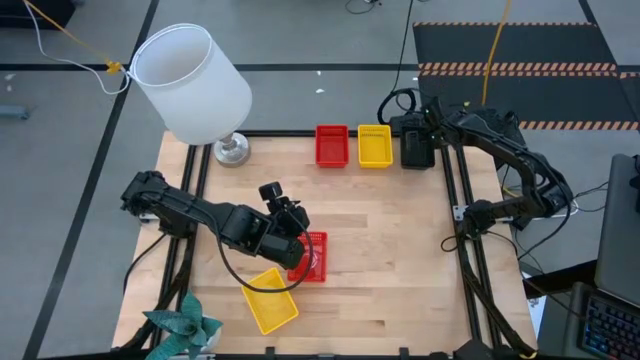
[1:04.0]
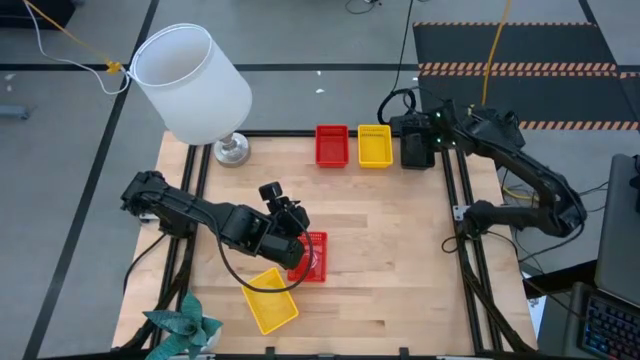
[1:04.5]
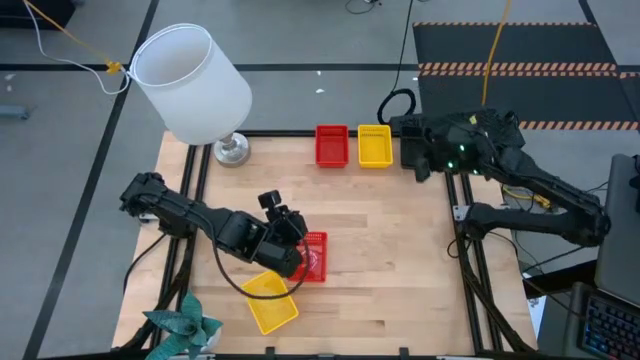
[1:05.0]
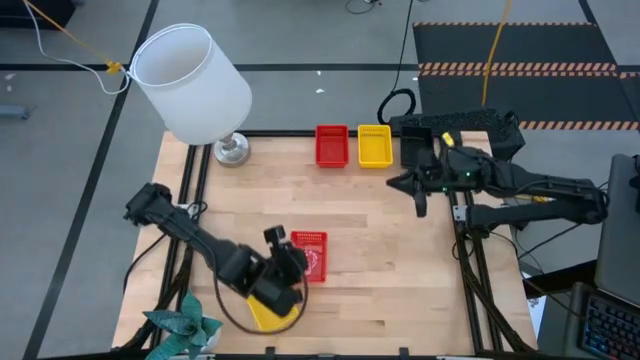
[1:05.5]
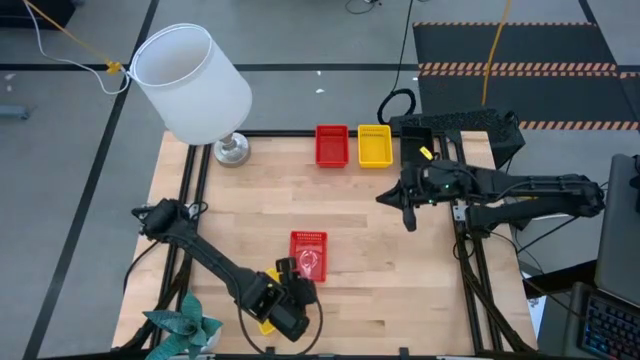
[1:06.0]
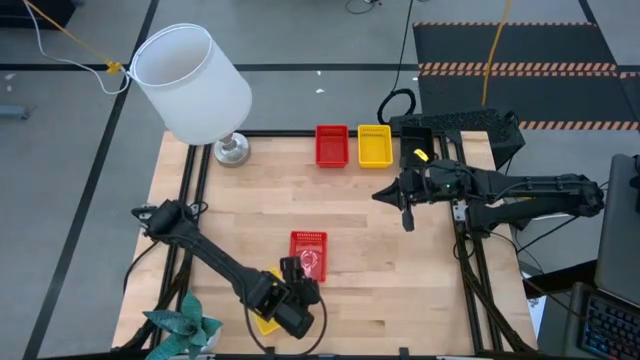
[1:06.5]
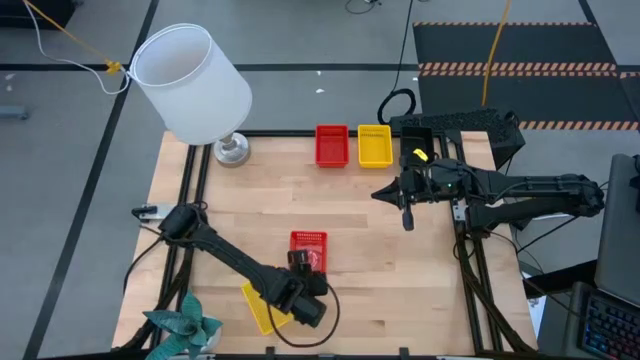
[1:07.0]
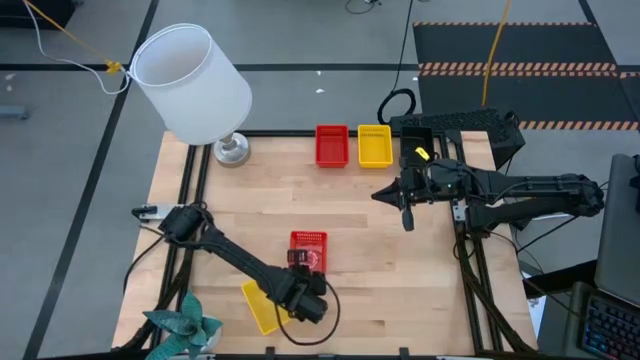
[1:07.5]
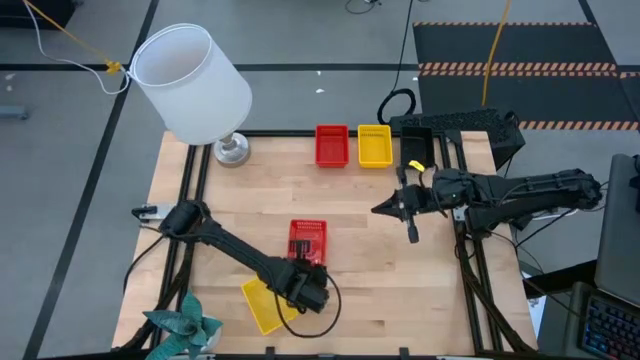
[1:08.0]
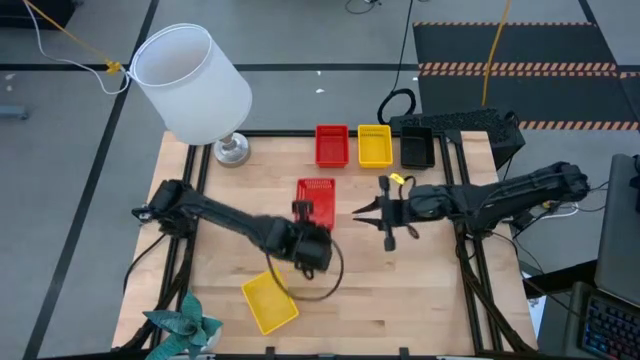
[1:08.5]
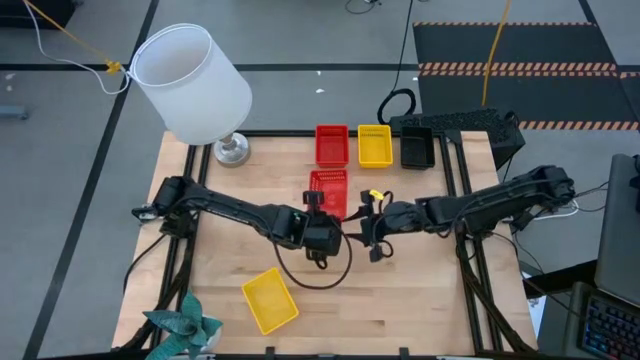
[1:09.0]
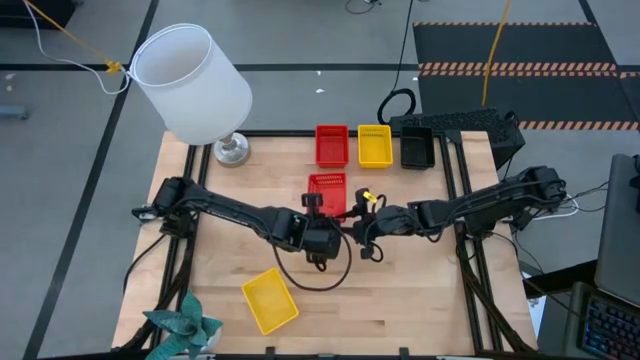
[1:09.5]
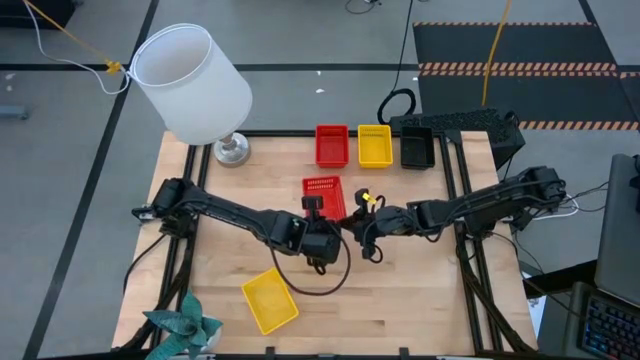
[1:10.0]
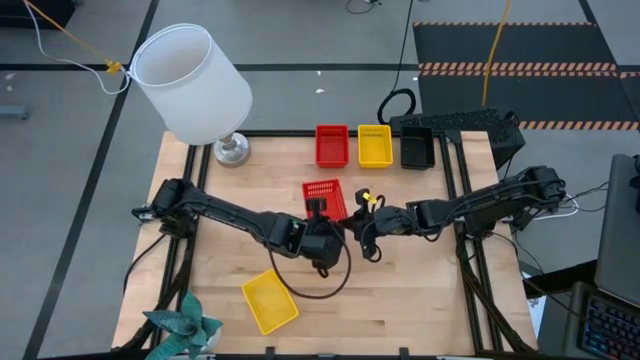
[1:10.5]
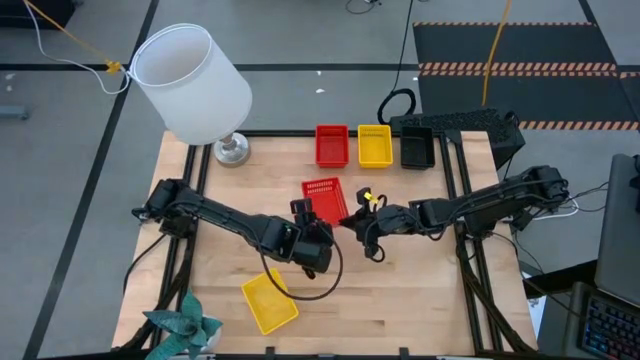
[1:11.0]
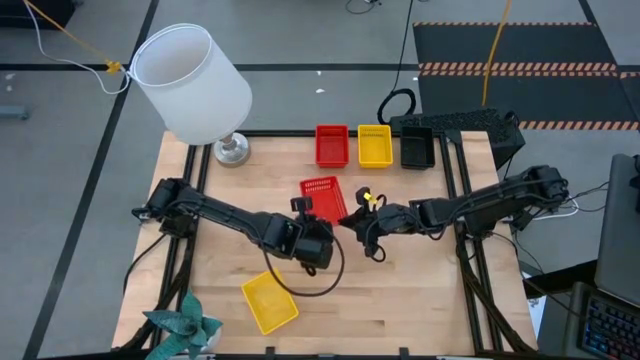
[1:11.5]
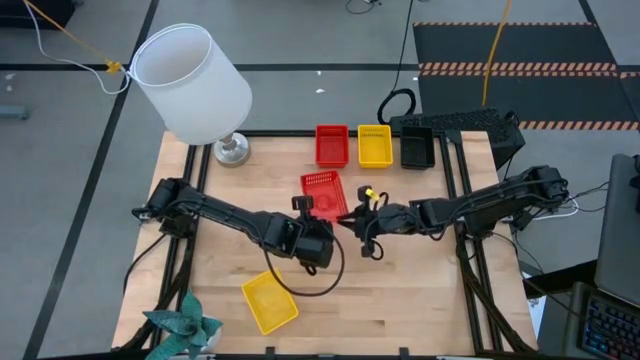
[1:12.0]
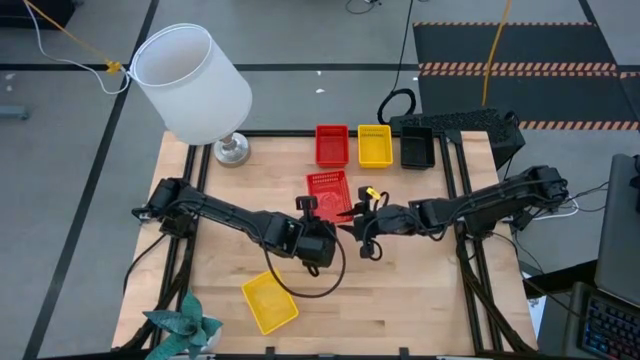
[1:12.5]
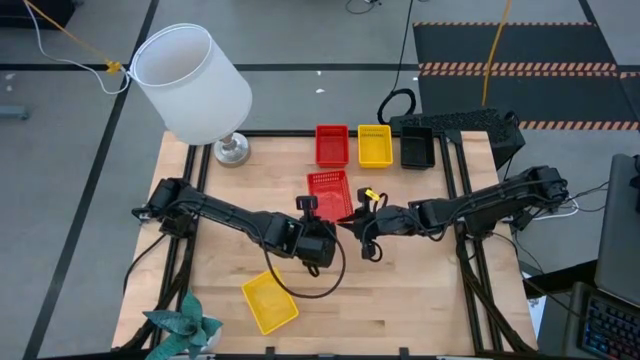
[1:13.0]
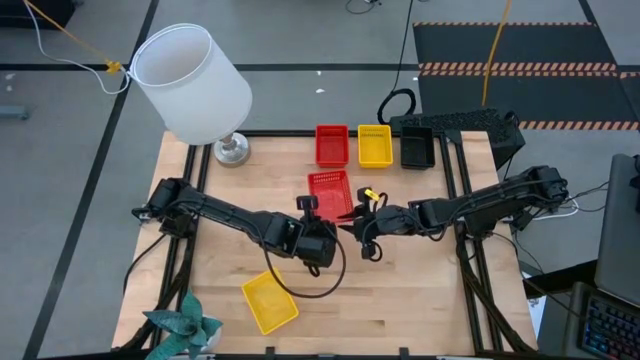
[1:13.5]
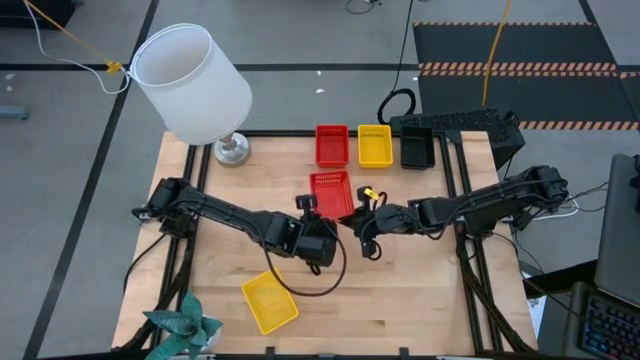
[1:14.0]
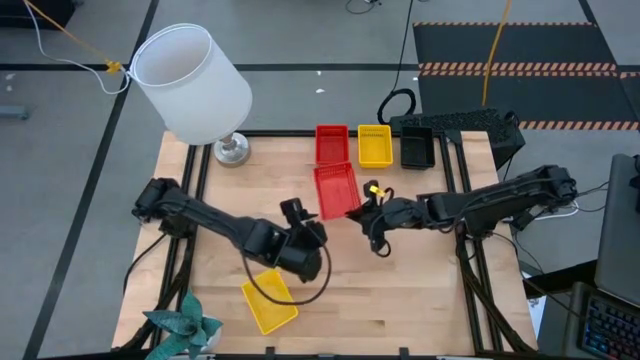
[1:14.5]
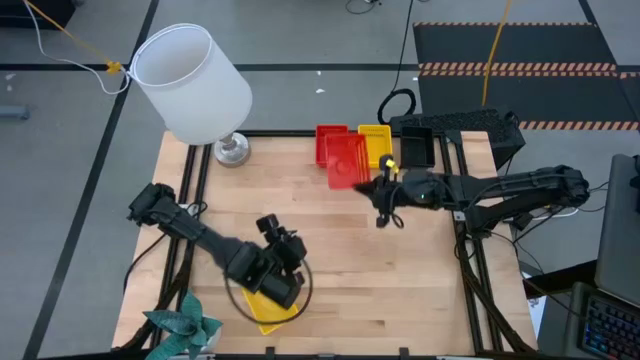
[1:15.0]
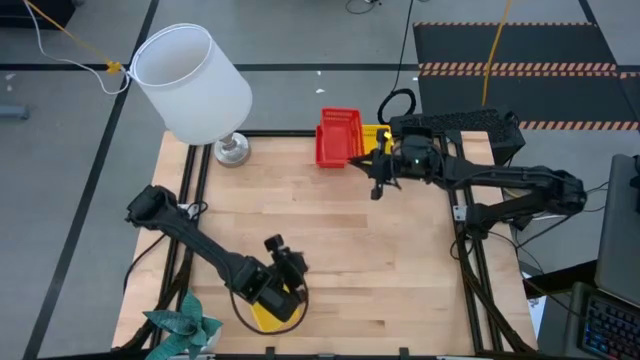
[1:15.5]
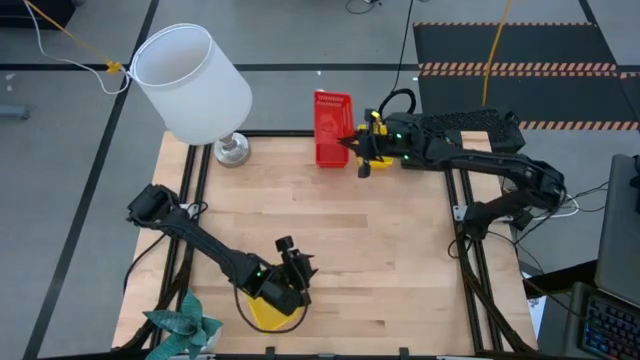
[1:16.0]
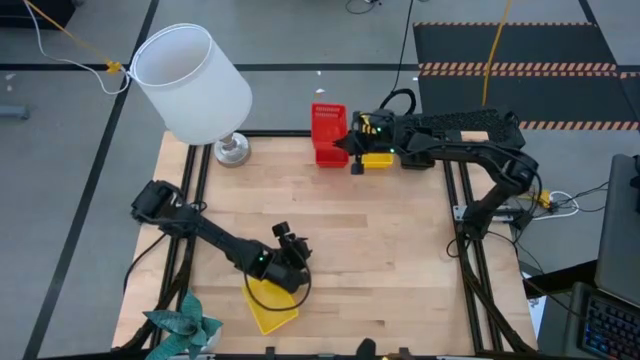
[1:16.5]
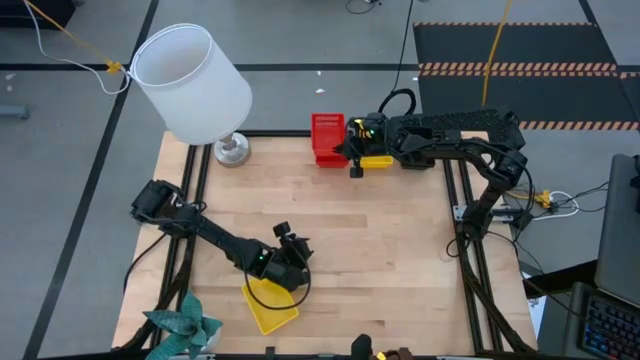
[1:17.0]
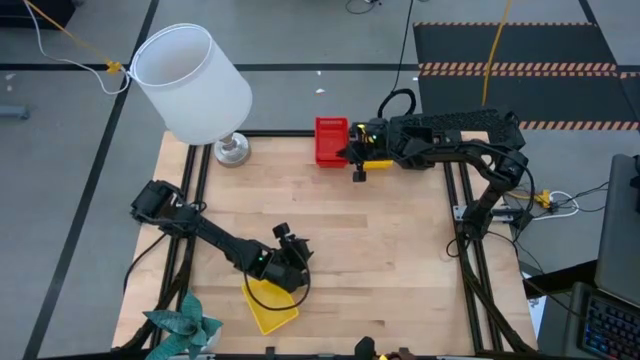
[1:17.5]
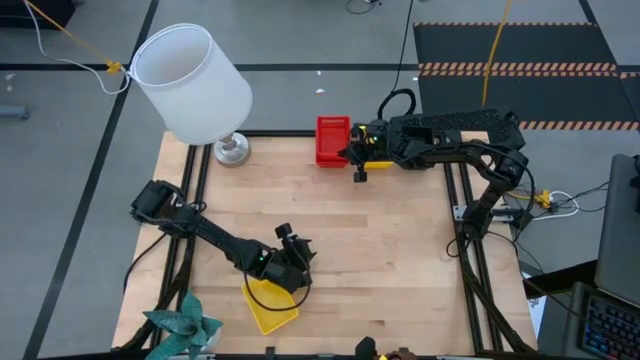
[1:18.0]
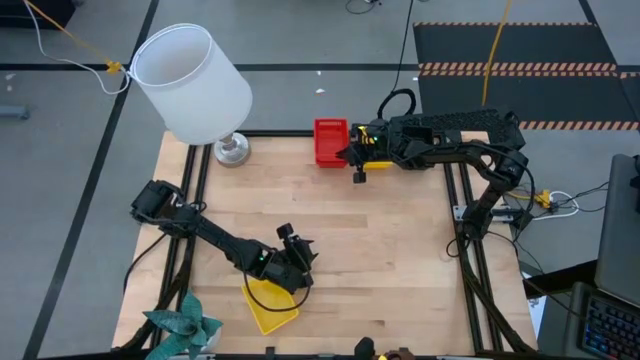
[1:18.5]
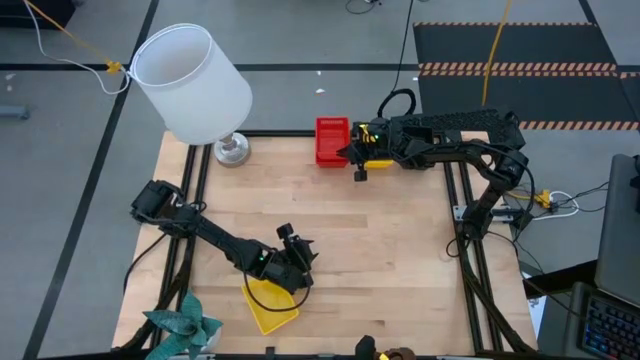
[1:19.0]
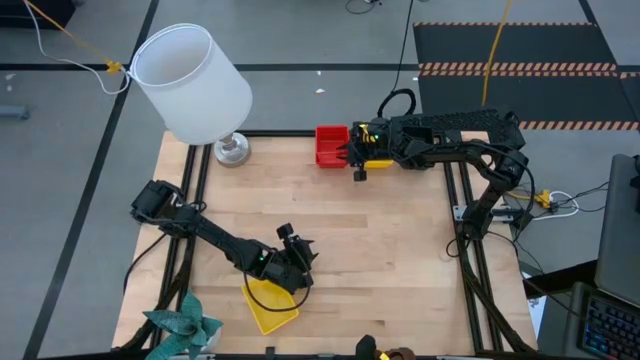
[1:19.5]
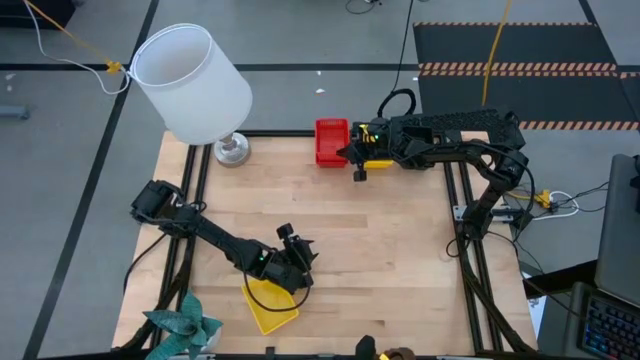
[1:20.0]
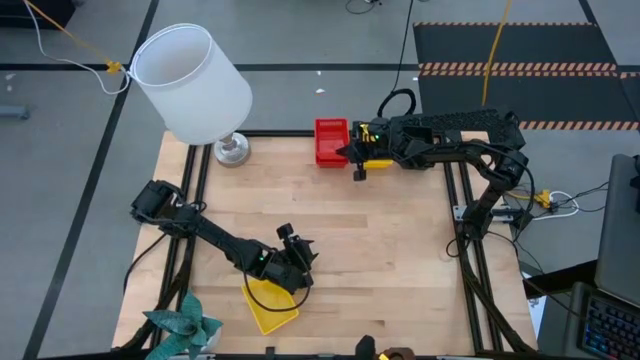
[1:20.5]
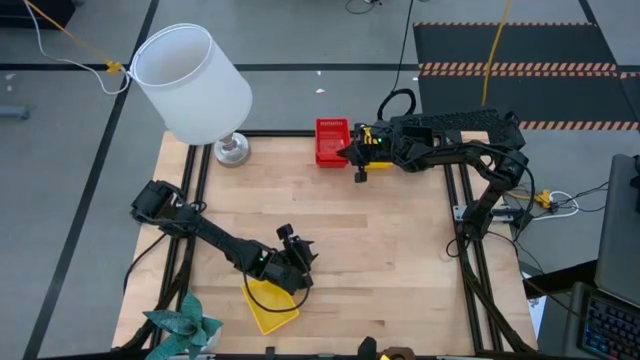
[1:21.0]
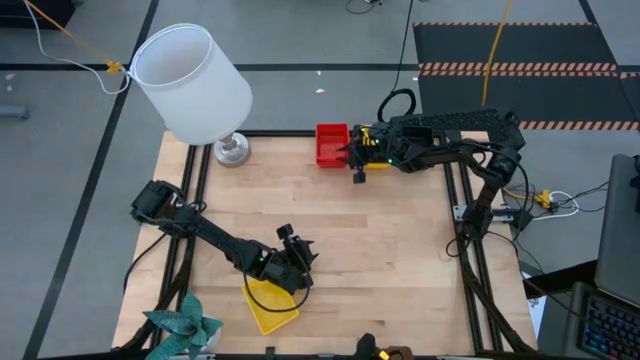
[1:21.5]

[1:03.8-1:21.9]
Stack the bottom red bin on top of the red bin

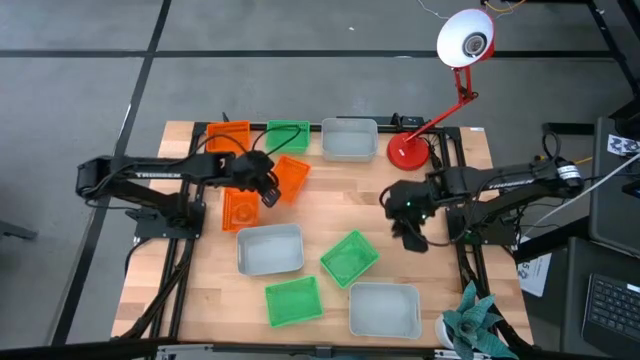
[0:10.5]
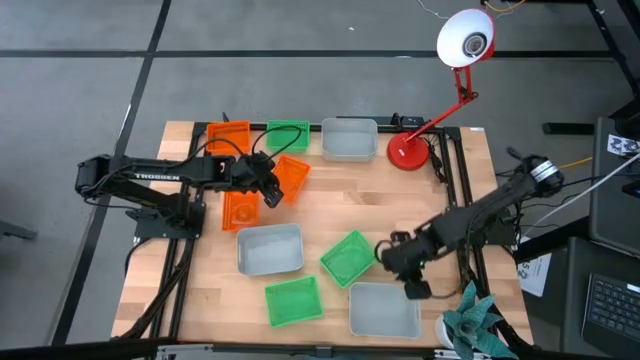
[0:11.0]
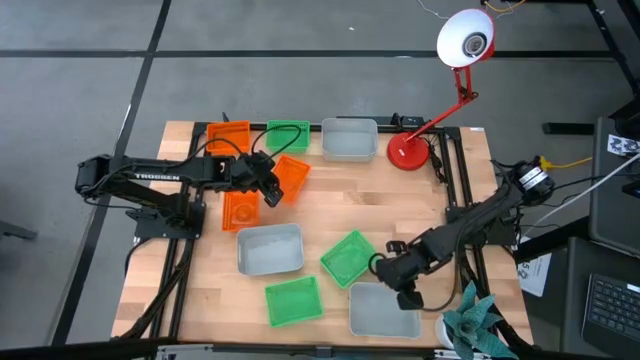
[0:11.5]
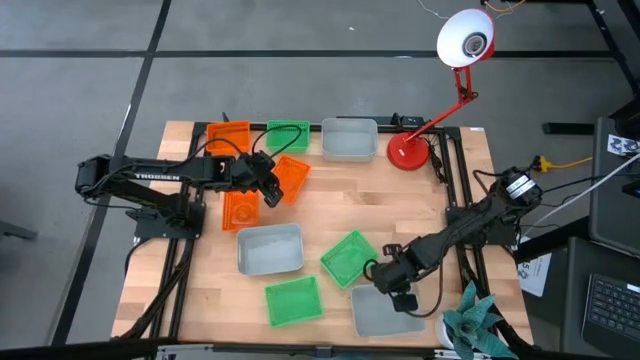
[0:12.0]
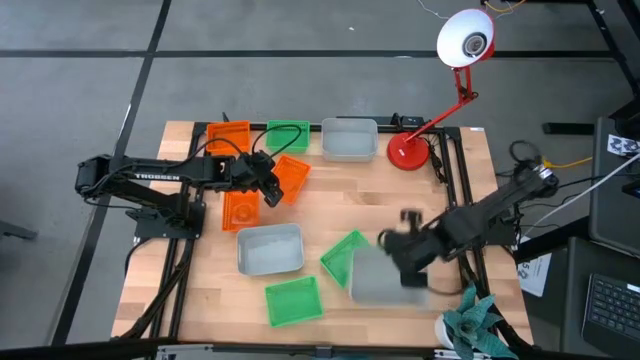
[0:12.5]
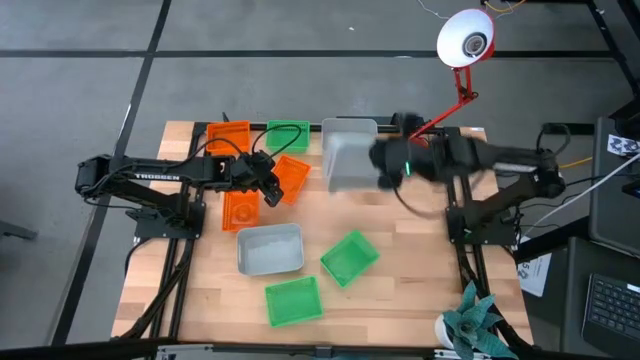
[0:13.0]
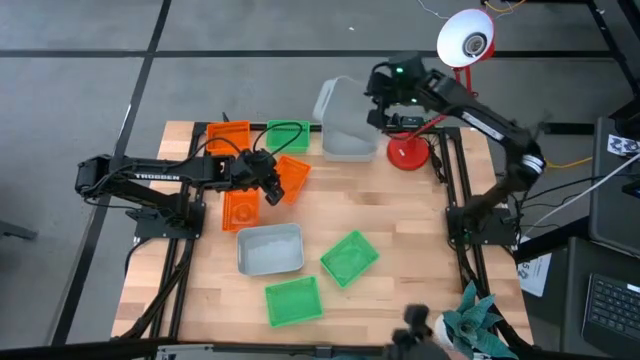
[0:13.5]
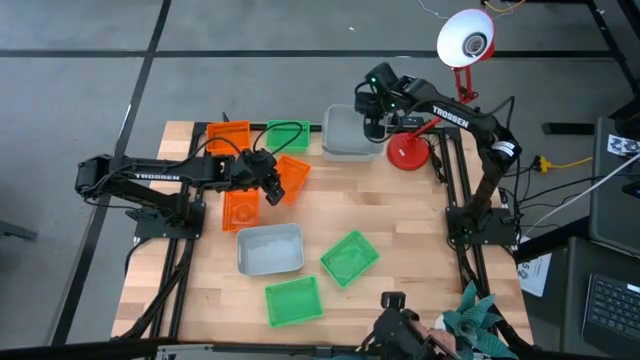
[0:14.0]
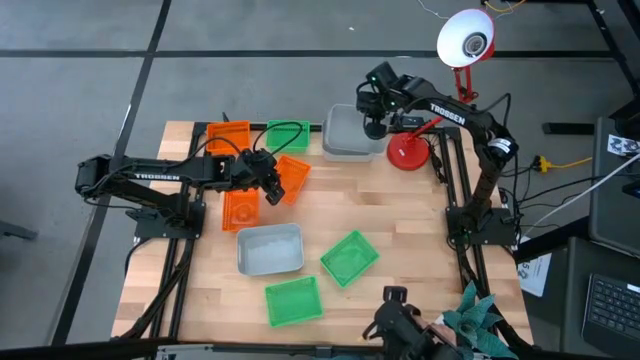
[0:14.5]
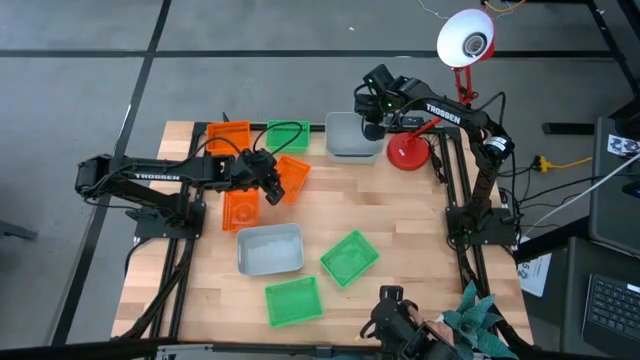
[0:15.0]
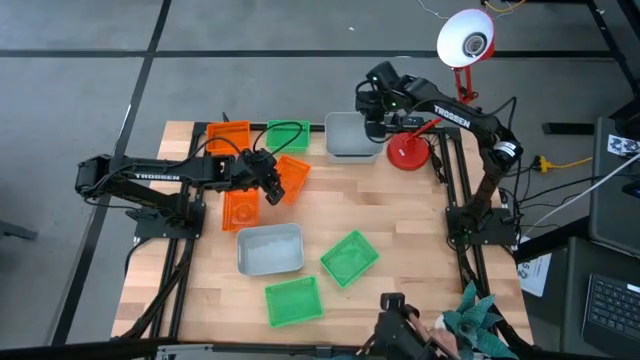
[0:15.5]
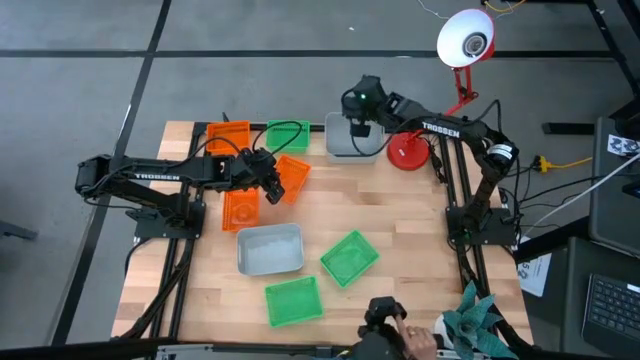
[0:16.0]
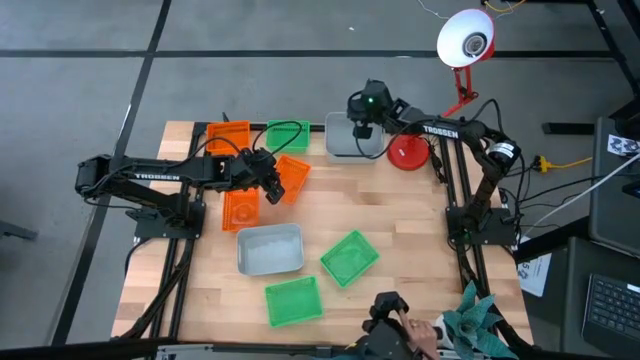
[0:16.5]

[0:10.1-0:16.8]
Stack the bottom gray bin on top of the top gray bin
